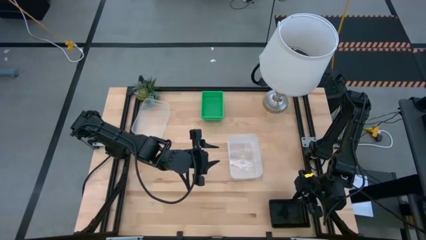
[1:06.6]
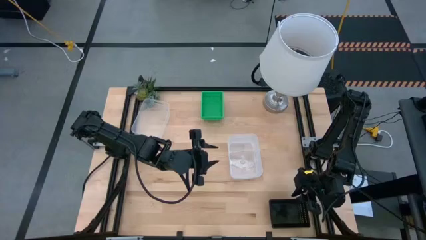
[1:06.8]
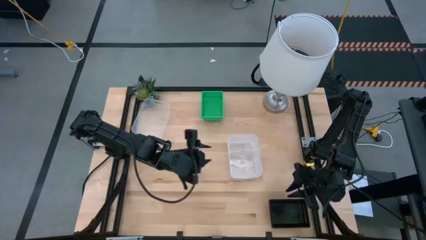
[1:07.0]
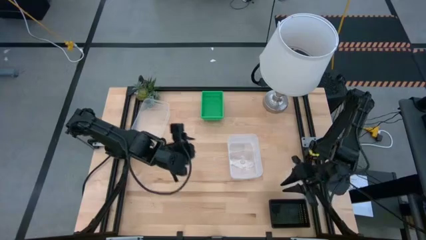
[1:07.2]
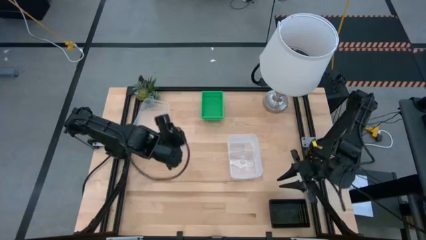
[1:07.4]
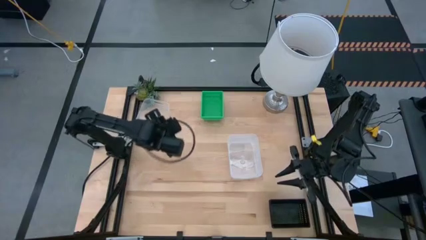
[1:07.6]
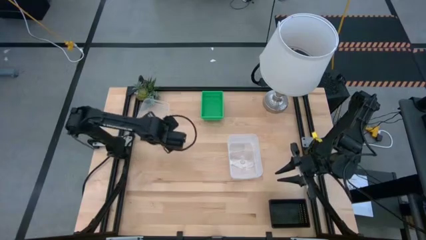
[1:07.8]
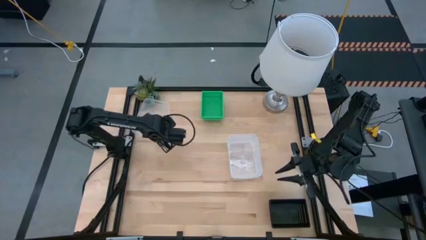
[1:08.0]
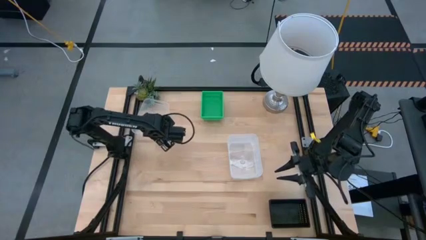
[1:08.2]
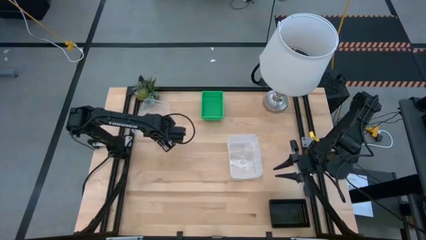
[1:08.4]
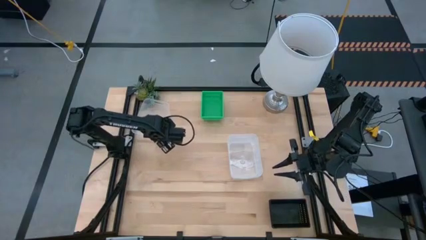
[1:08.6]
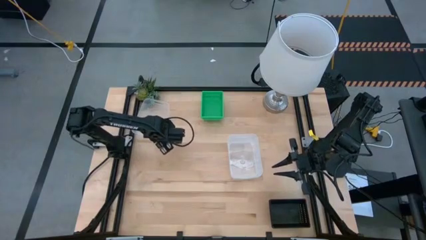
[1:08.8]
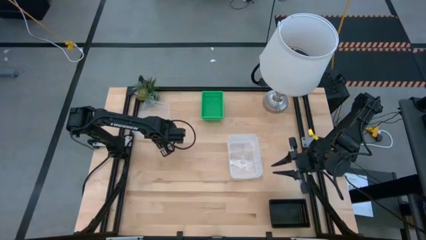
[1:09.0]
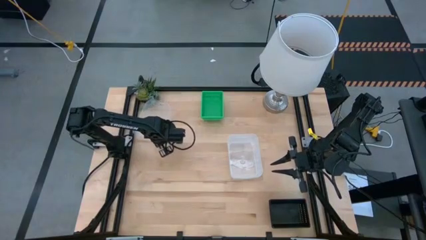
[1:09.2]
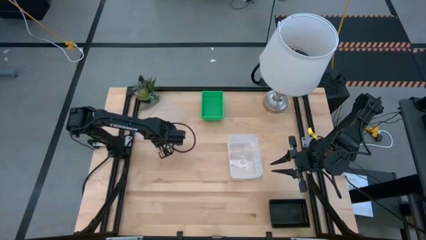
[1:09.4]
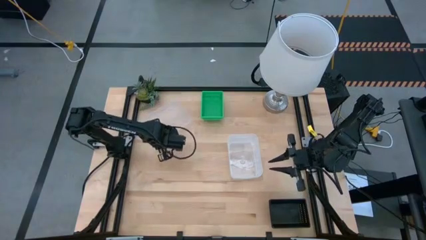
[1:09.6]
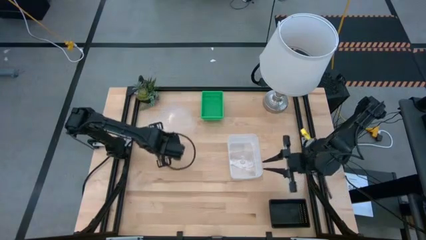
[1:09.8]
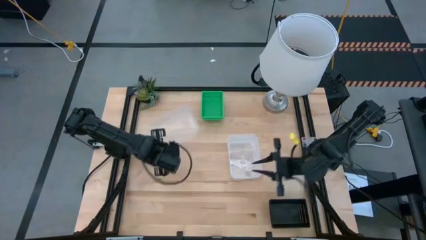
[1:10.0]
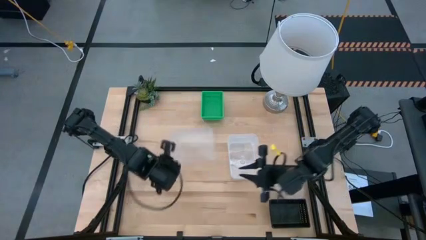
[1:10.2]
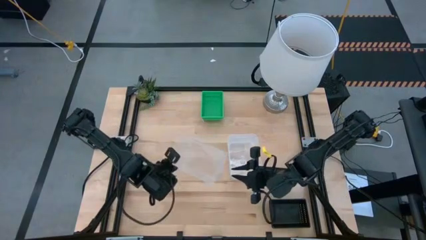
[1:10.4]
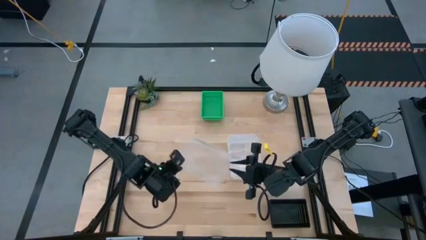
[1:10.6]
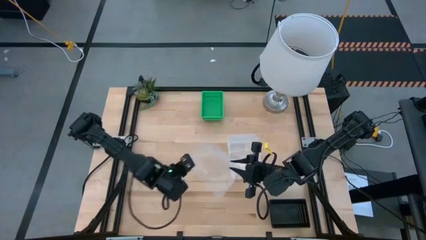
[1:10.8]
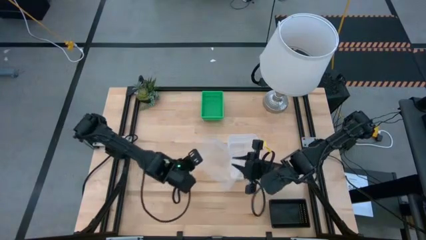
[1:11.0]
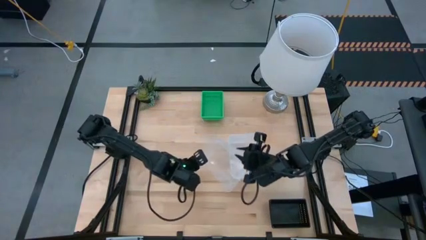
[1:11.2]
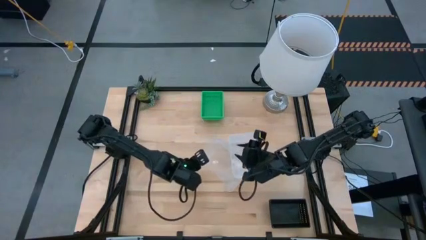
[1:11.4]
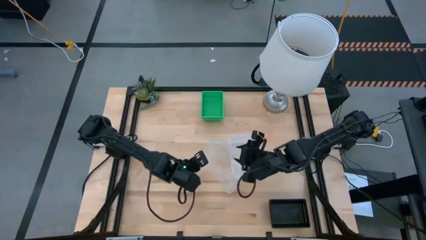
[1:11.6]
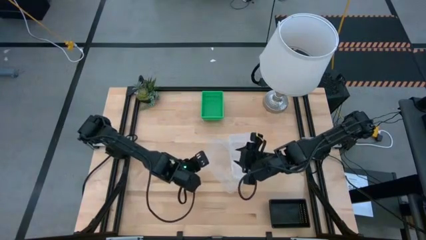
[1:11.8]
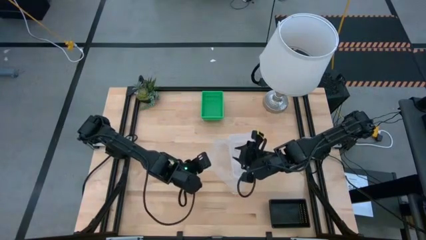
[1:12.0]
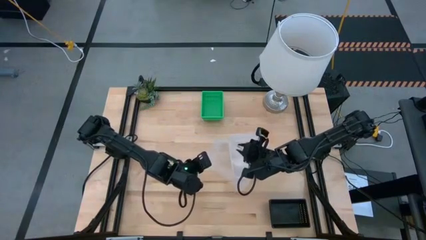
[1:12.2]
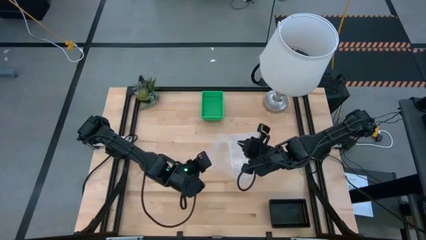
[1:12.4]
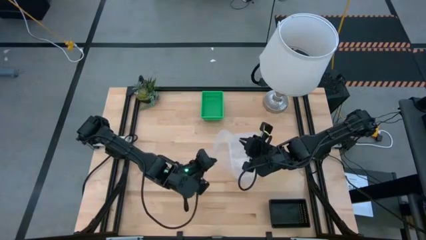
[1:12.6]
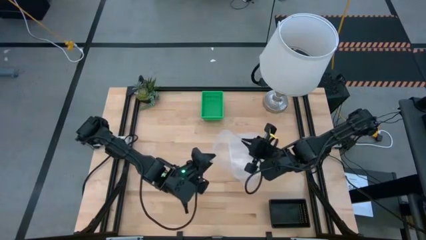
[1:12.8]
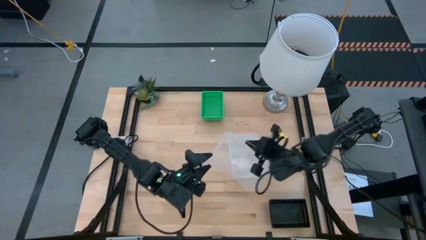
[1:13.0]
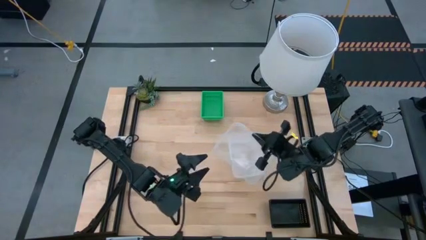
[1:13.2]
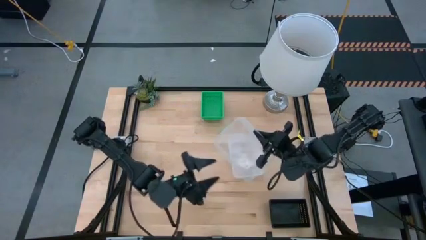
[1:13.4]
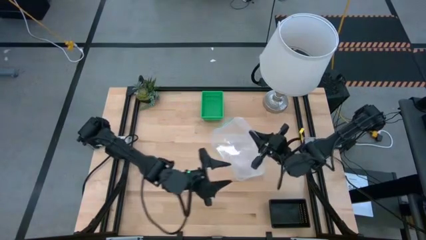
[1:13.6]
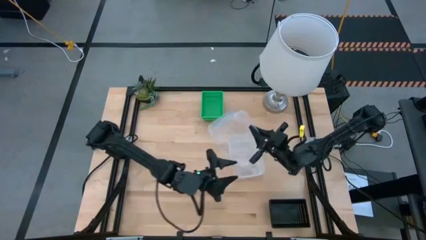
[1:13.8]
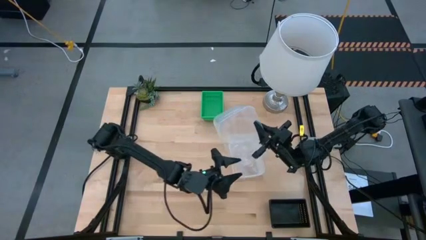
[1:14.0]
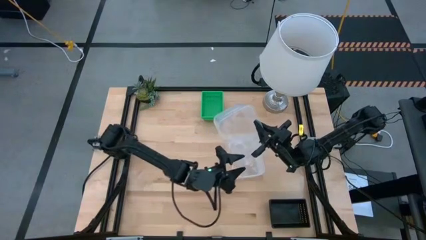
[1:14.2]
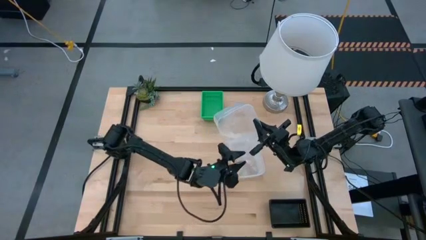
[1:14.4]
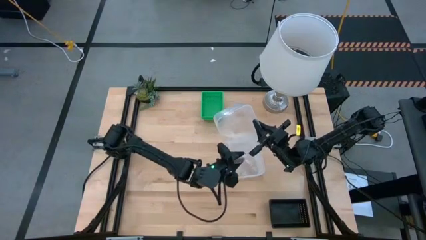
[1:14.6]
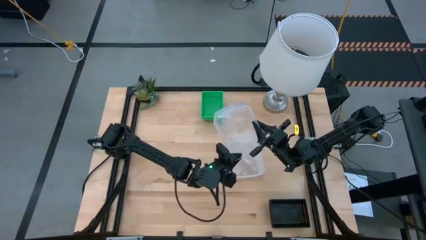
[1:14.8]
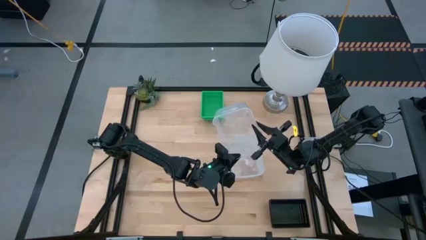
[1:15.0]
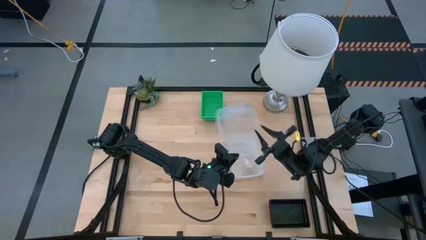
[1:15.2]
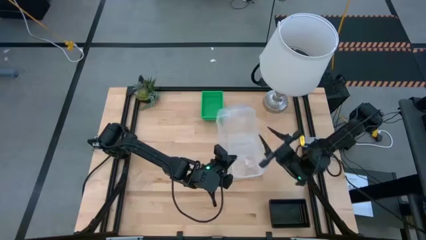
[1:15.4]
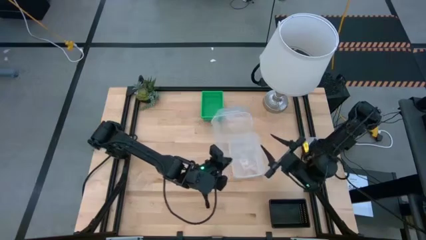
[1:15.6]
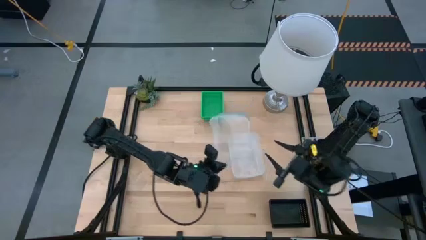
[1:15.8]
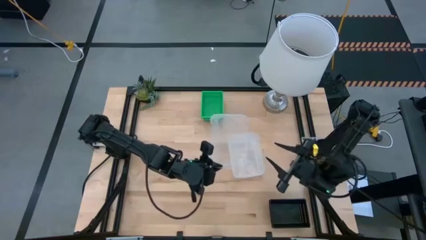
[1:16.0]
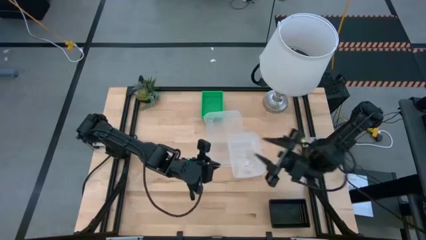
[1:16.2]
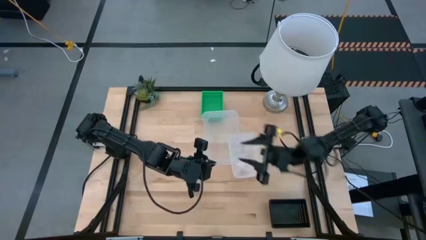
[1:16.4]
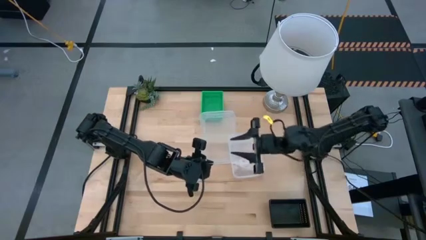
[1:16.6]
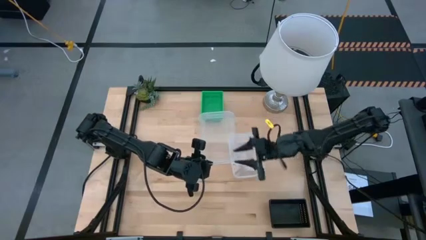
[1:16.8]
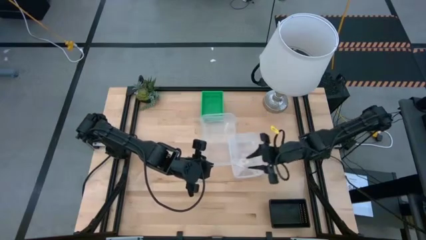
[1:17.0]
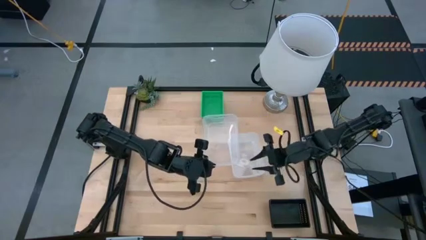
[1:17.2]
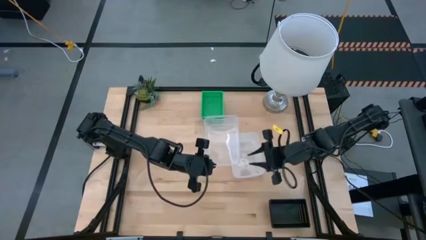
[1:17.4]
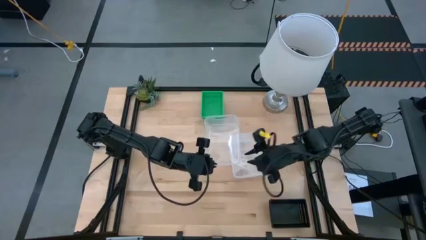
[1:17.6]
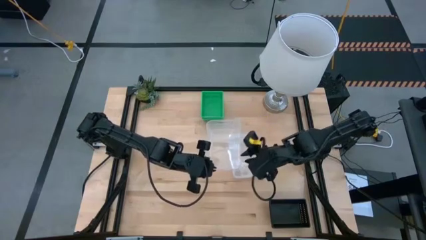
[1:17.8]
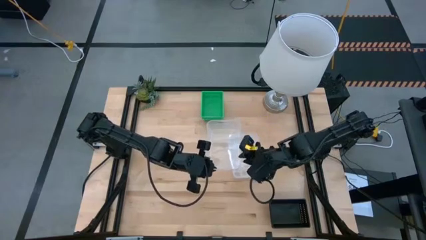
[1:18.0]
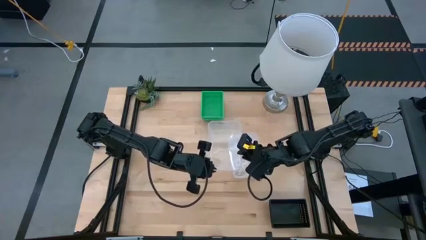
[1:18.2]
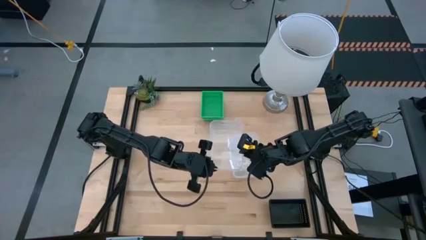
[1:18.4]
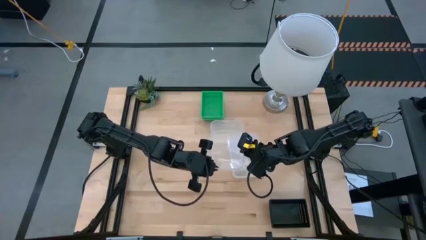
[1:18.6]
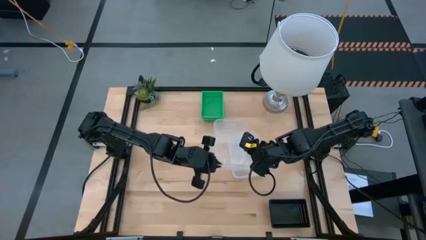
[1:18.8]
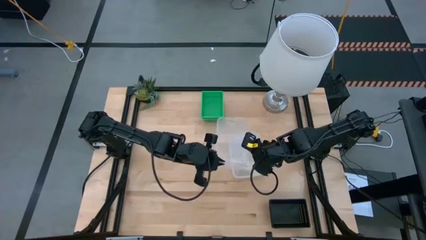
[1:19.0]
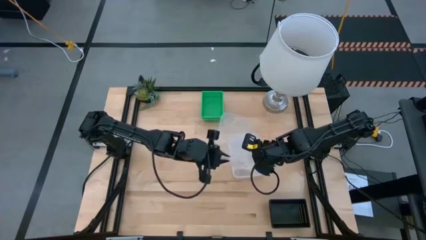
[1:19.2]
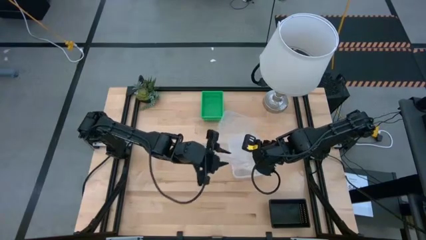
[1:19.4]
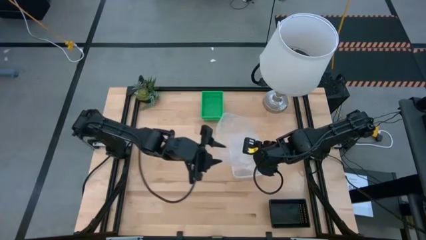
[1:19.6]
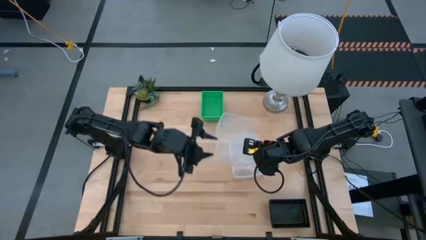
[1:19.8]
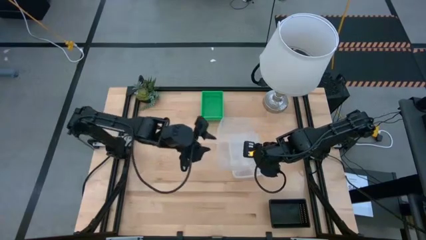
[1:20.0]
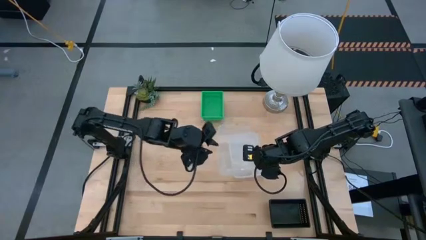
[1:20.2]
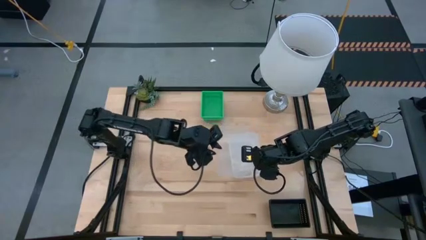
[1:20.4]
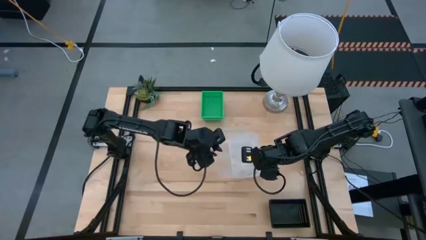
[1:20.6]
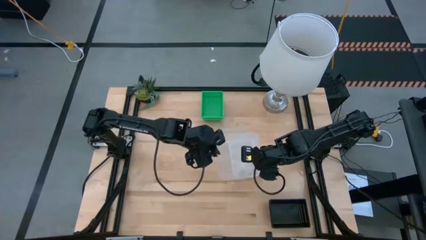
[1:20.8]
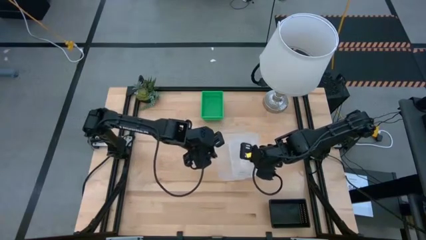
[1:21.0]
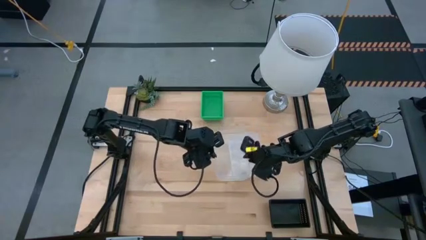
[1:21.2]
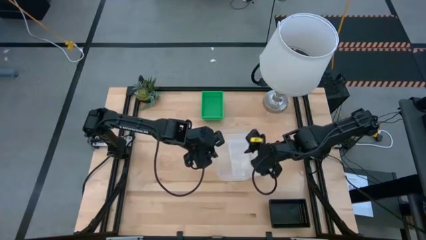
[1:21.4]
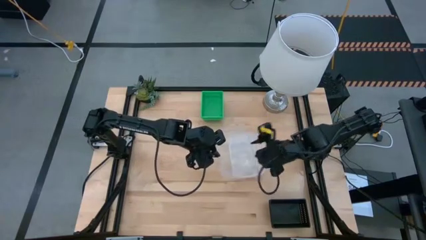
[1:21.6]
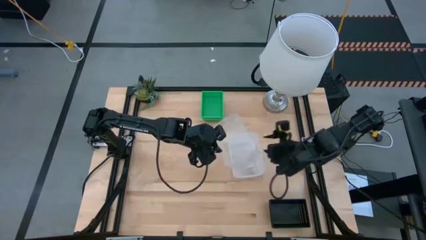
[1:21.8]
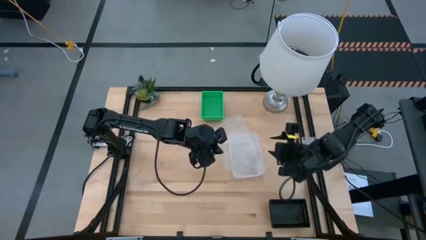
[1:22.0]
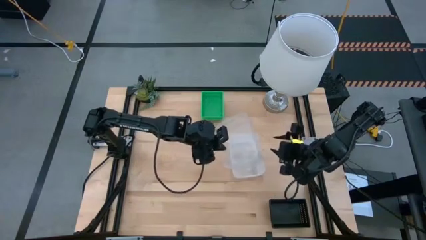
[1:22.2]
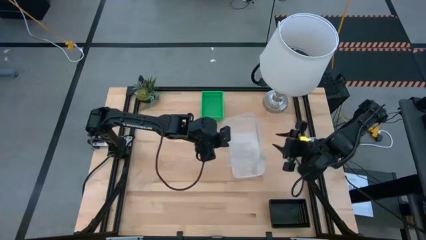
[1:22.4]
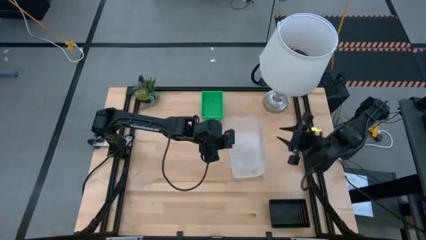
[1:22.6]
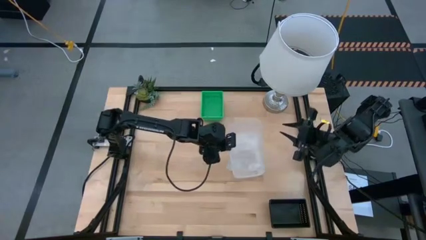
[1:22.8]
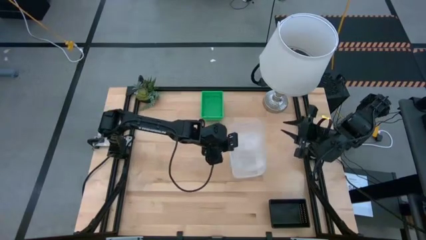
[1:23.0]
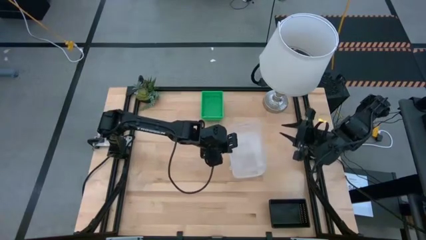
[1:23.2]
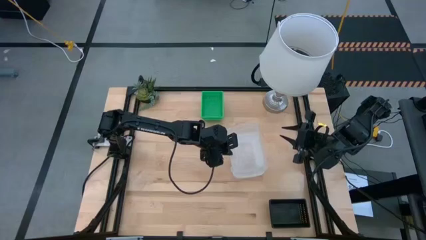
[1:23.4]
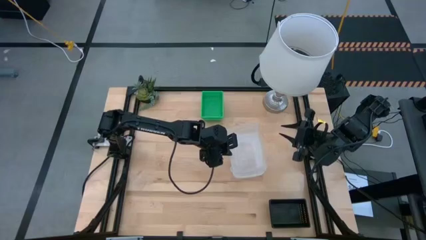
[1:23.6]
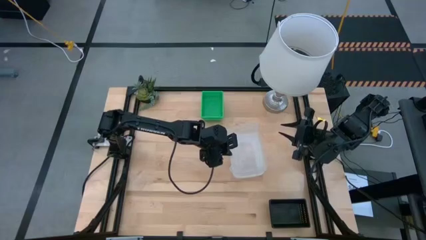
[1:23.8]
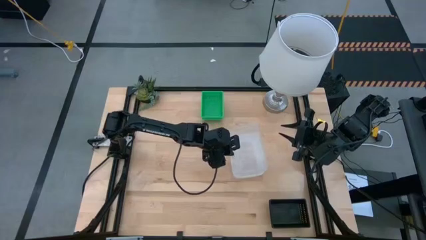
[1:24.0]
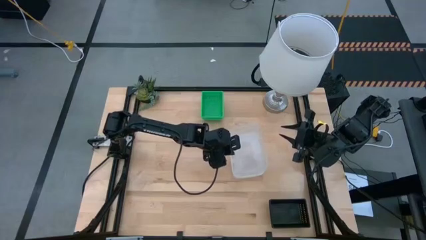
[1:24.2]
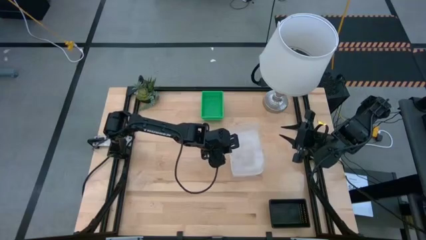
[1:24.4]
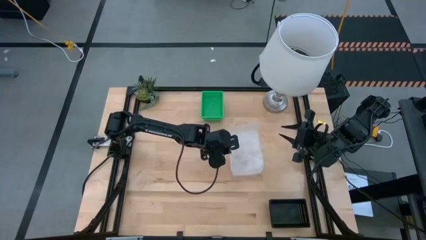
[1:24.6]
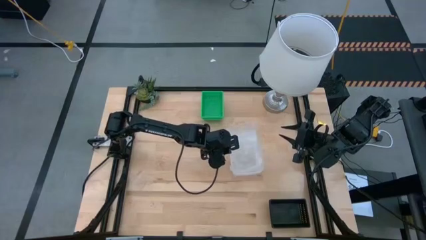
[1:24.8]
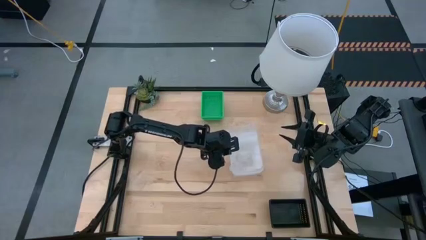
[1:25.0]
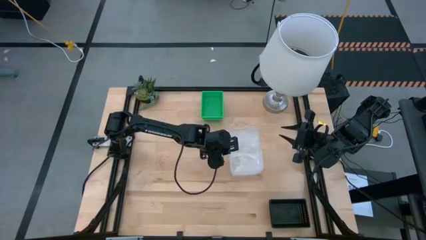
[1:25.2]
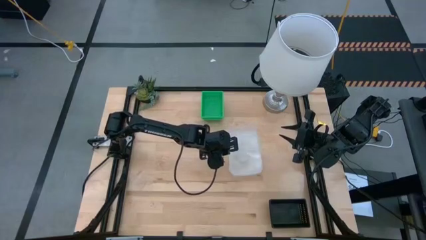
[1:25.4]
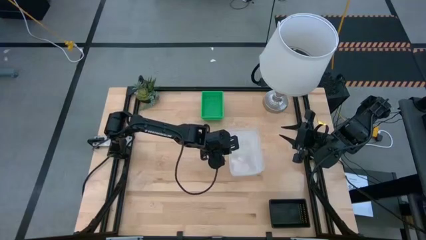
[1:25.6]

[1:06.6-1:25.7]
Stack the top transparent bin on top of the bottom transparent bins
